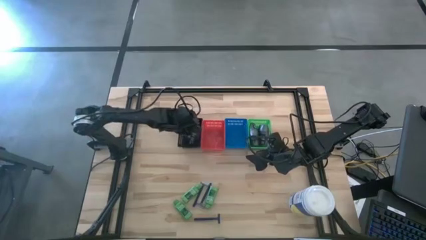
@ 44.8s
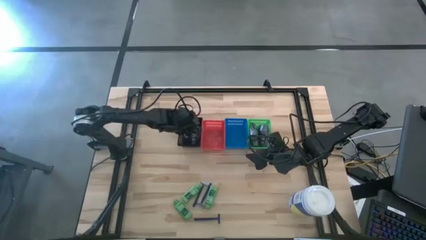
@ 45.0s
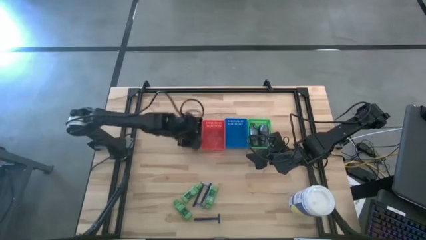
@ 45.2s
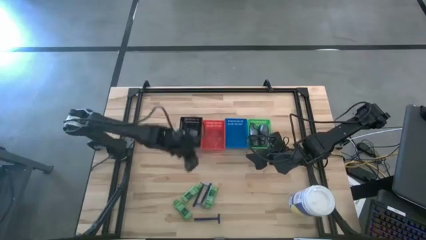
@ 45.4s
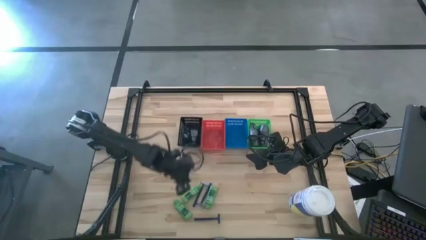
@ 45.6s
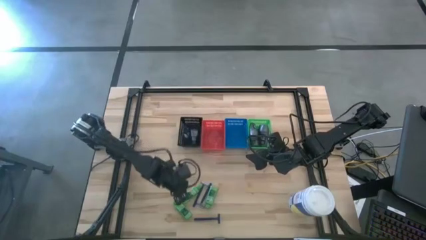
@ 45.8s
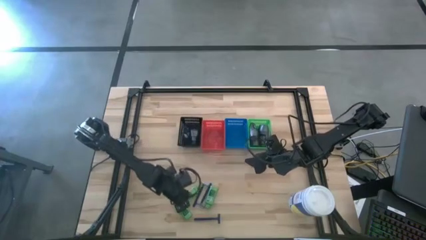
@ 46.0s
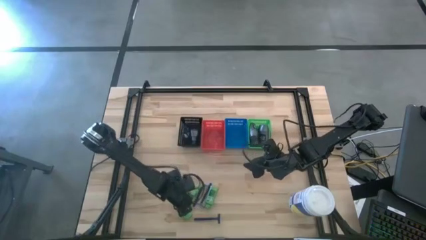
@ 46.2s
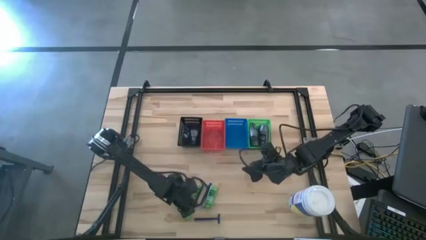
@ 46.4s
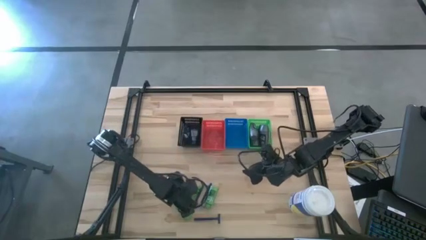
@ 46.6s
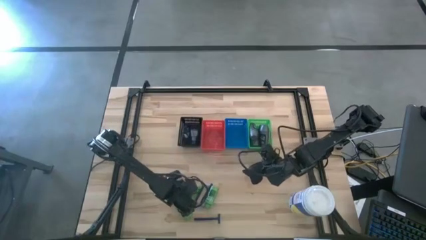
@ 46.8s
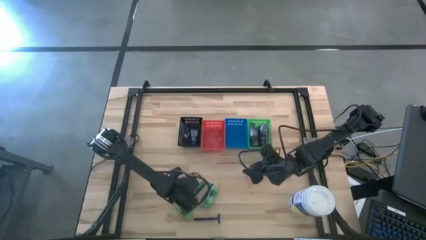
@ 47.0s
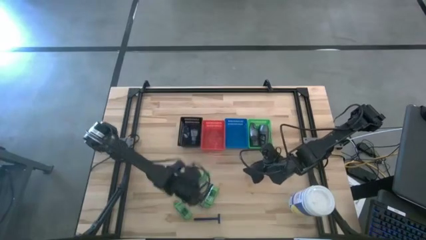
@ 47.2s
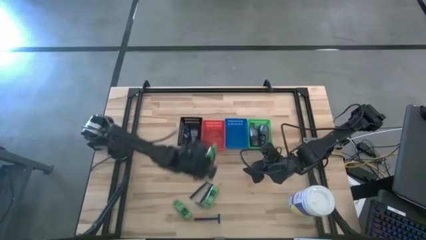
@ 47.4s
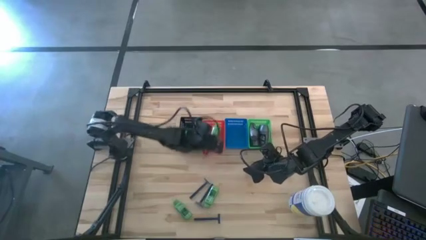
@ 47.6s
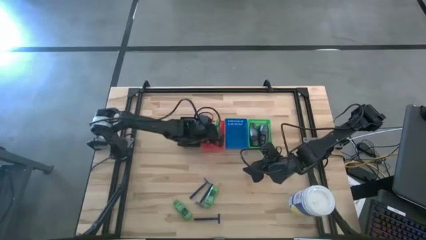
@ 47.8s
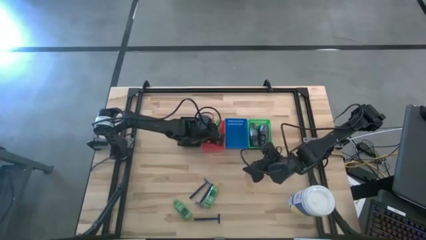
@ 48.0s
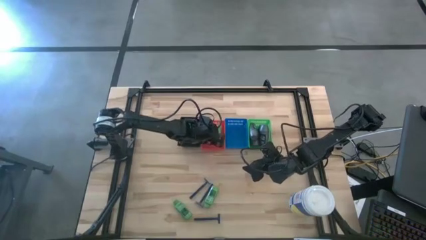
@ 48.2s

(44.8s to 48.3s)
Task: Pick & Place Travel size toiletries
Put the green shampoo into the red basket

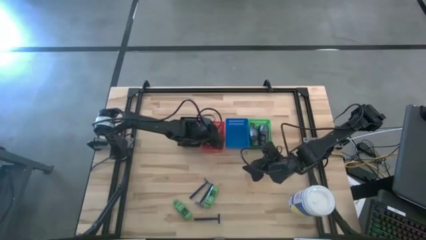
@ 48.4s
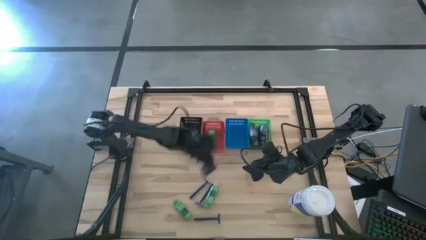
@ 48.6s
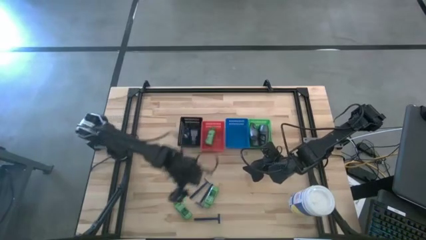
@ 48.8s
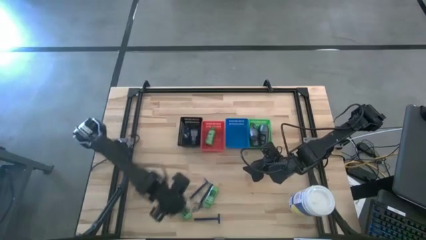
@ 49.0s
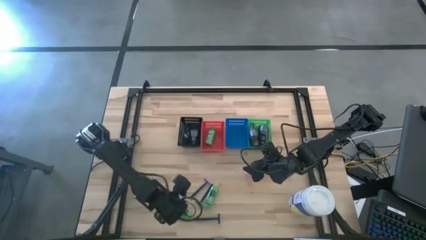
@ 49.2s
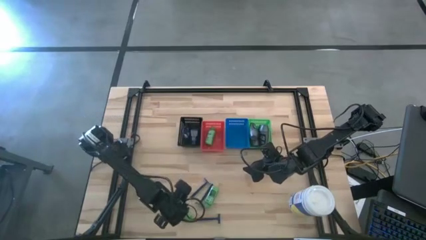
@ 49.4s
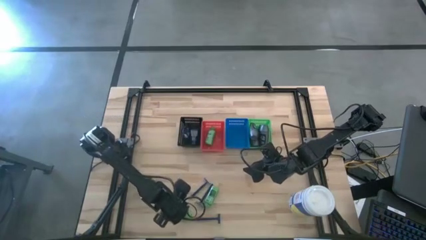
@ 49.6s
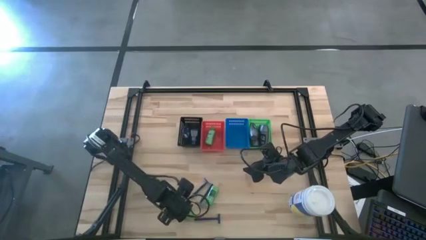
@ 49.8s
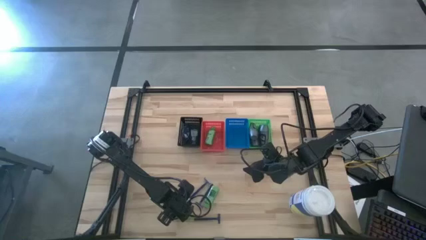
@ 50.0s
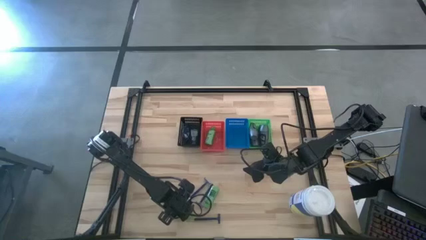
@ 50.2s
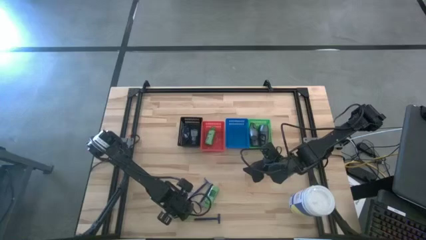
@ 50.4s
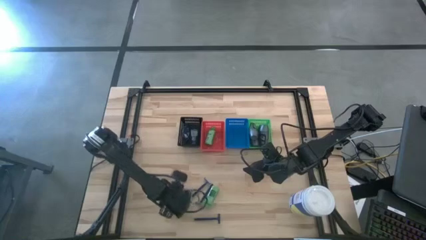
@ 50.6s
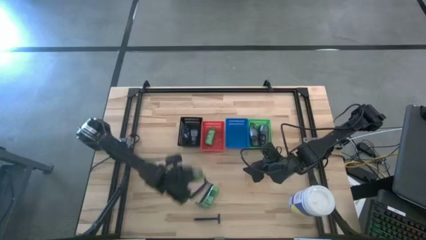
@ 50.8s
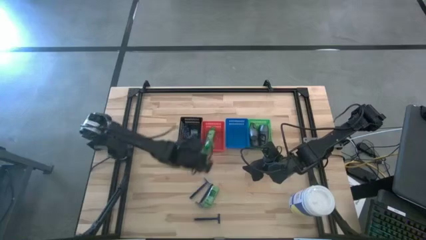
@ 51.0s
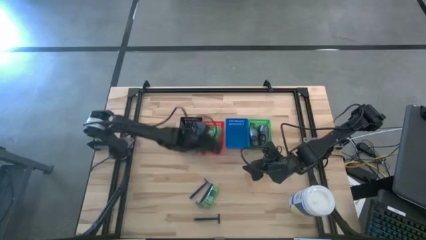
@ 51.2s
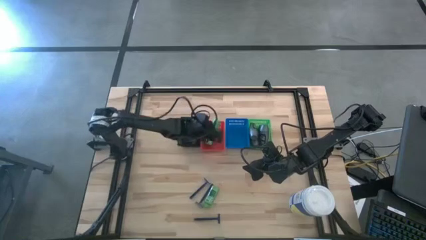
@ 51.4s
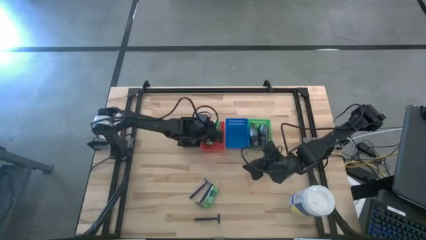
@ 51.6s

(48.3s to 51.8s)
Put the green shampoo into the red basket

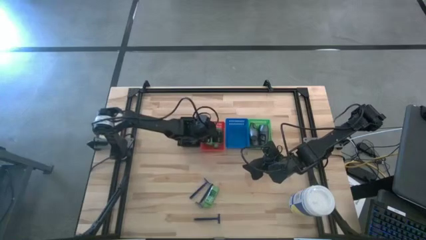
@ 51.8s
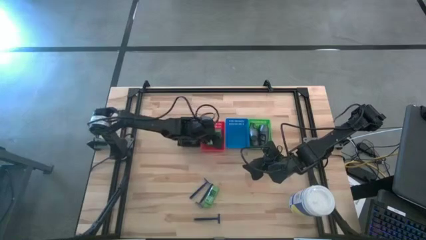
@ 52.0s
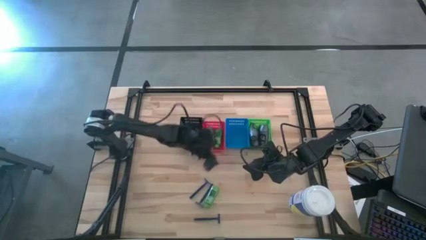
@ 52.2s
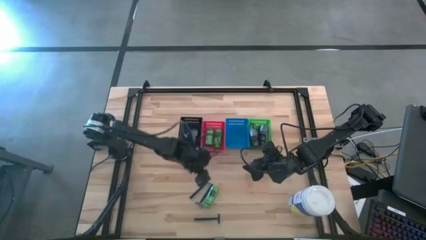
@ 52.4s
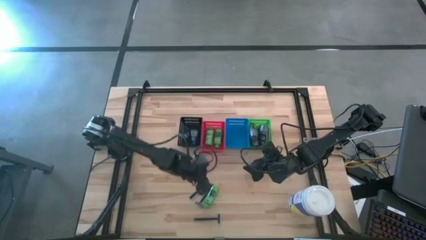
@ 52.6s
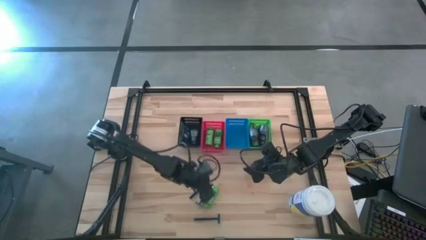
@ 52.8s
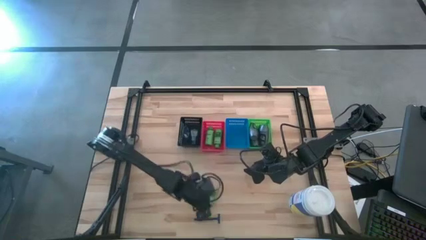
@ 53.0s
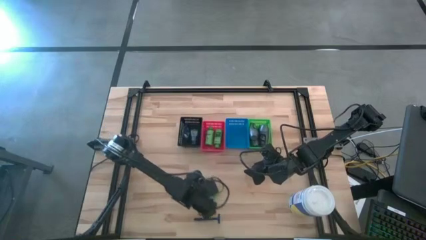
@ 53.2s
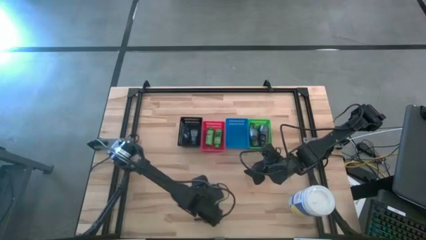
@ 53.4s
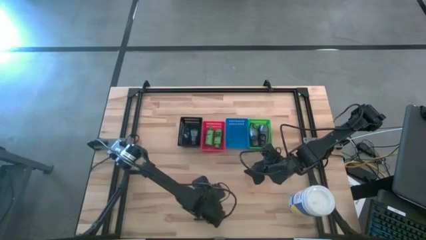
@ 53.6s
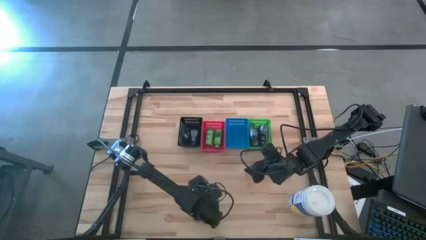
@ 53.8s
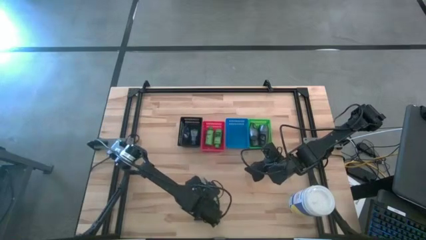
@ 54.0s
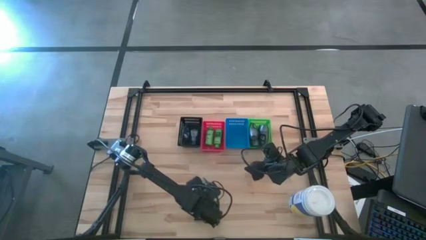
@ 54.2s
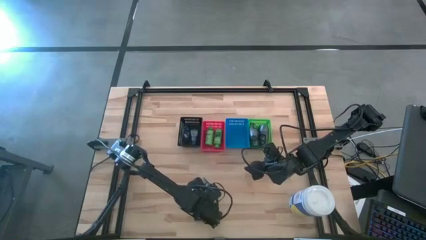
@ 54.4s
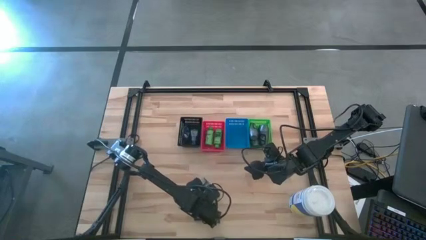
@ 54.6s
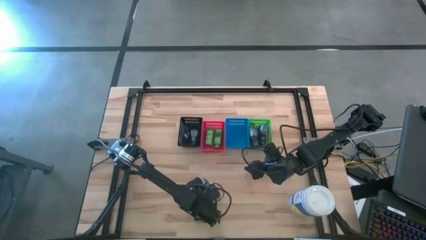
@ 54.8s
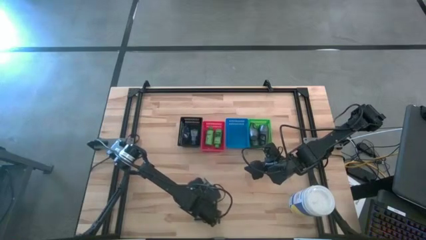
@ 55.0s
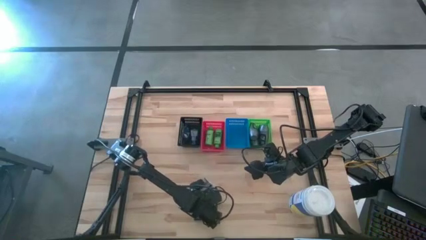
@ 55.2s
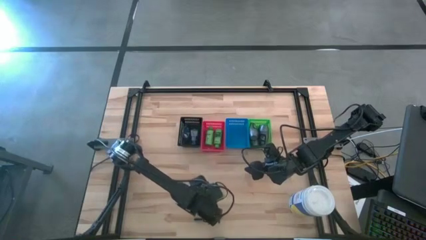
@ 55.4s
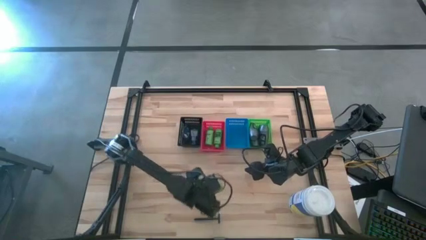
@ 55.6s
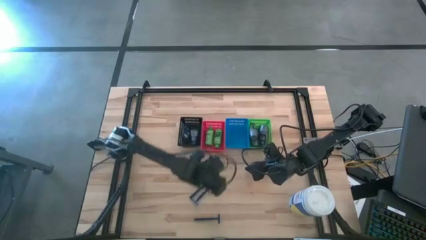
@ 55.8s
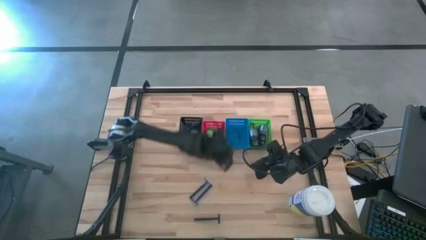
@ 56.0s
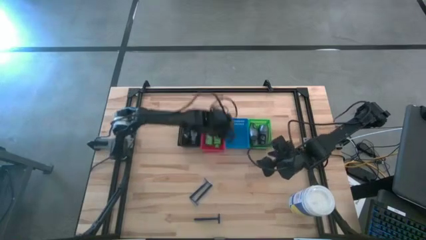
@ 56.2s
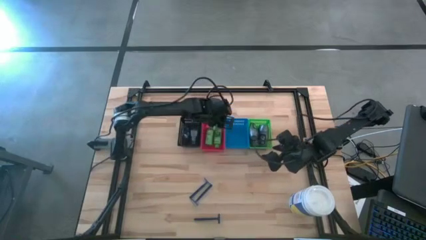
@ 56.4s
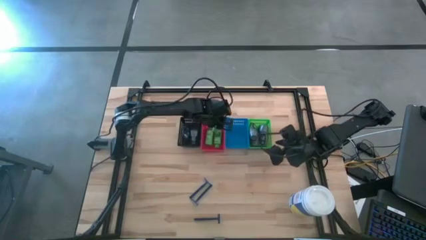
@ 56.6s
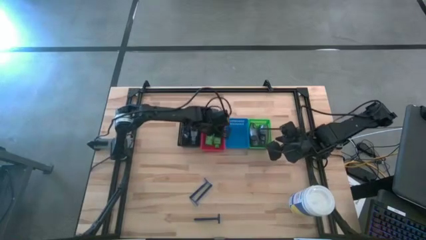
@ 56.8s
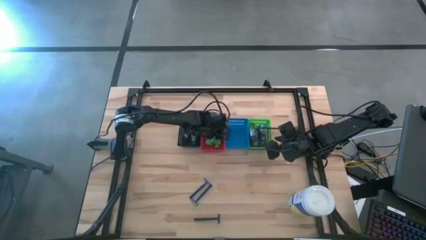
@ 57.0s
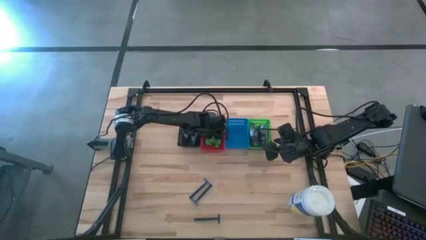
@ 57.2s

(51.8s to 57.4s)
Put the green shampoo into the red basket

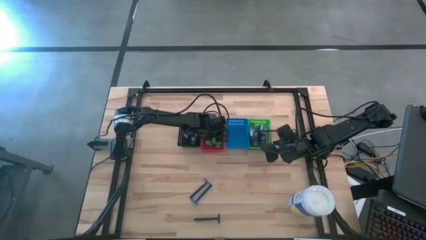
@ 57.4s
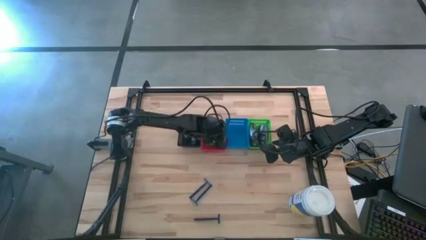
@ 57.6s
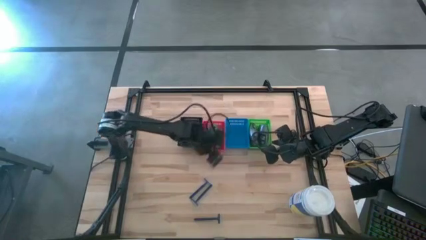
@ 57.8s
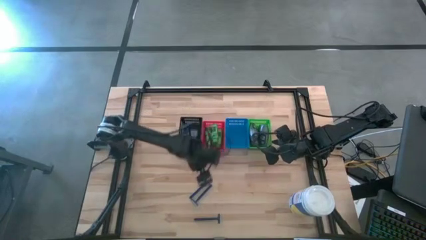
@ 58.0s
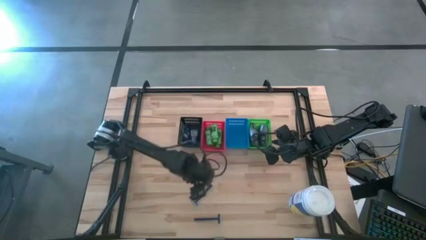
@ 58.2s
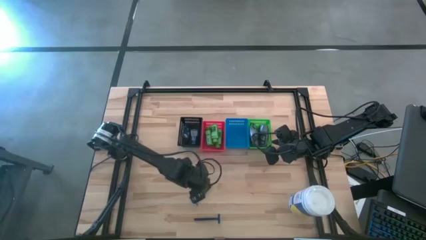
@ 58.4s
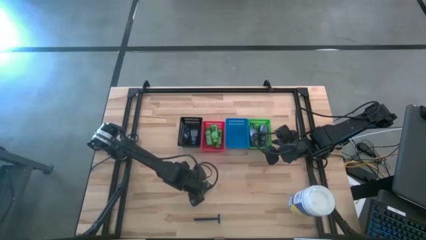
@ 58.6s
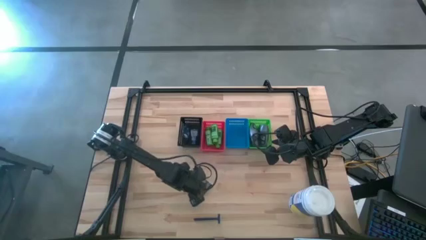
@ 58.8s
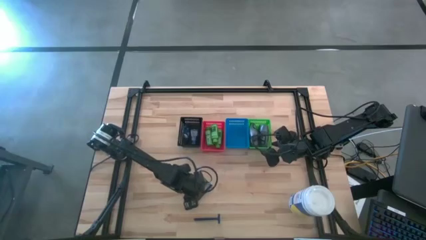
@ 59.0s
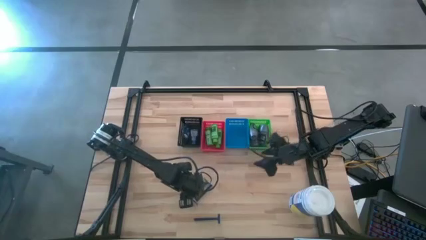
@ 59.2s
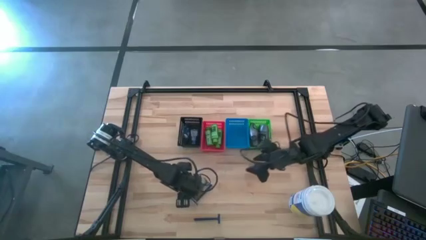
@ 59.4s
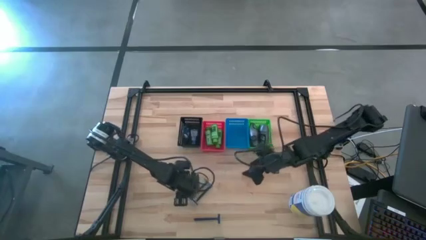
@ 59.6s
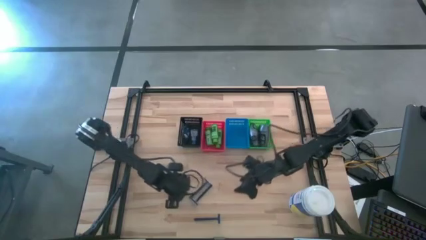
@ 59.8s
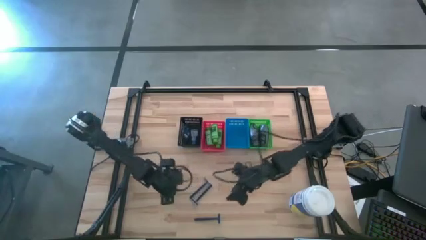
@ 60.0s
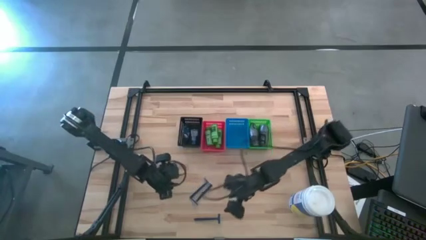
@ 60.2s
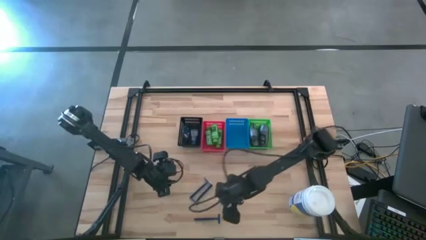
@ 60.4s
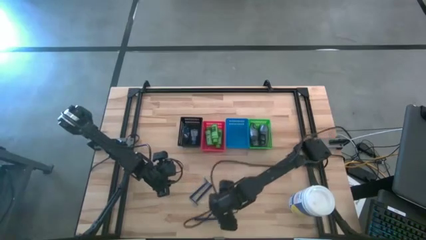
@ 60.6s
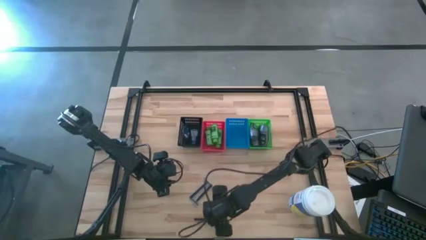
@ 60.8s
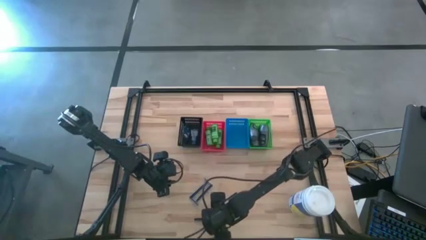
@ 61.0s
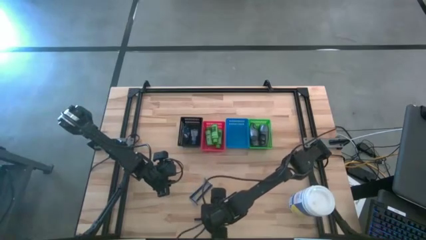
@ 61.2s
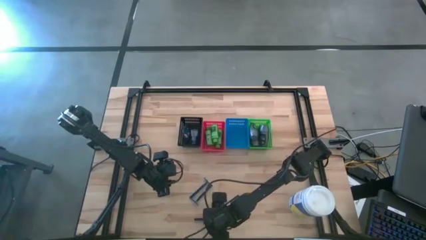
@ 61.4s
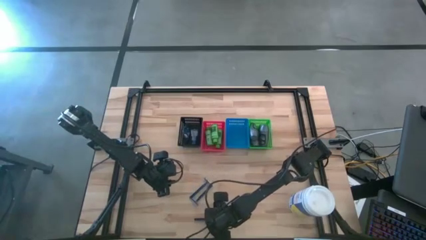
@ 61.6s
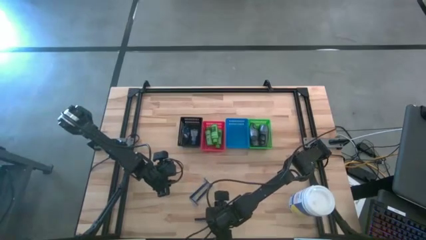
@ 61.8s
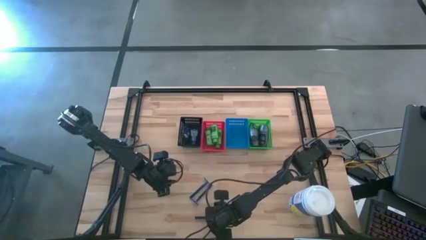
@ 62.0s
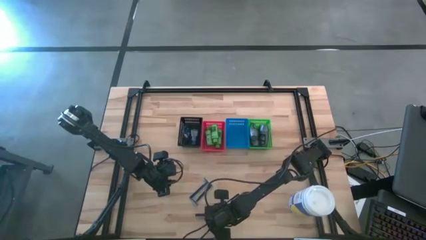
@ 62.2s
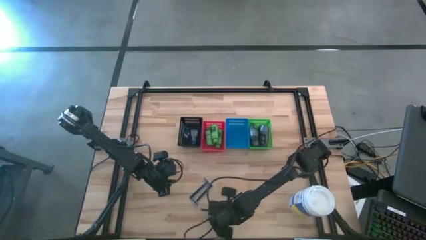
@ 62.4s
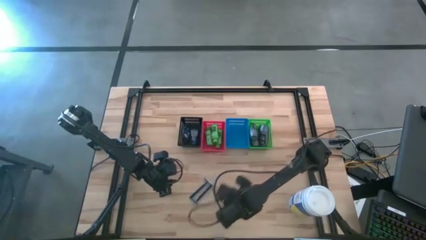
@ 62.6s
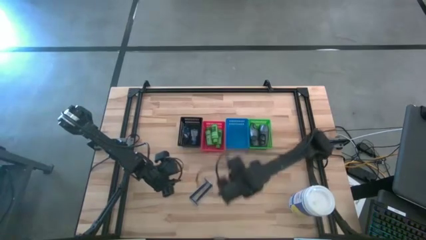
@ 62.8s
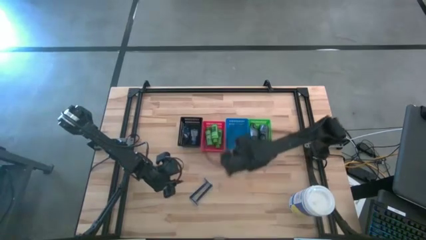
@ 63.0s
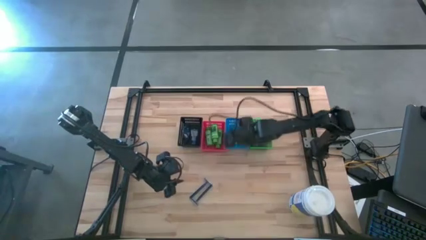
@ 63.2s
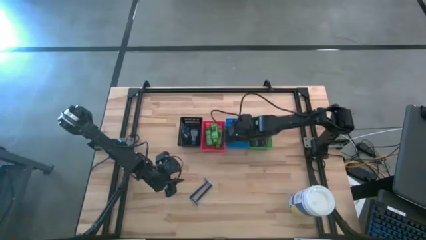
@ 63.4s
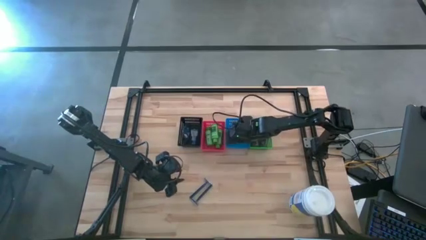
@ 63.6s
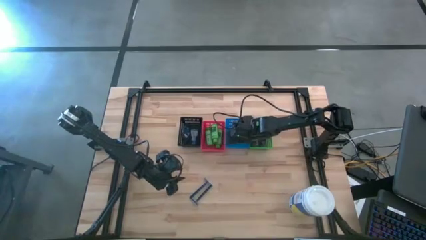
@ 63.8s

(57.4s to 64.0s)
Put the blue razor into the blue basket
